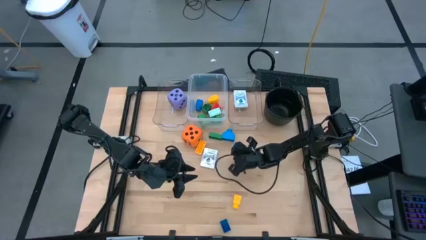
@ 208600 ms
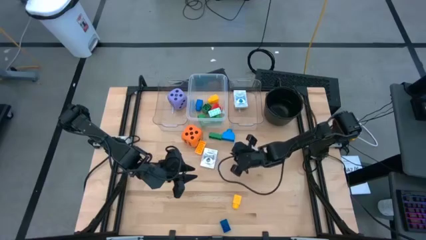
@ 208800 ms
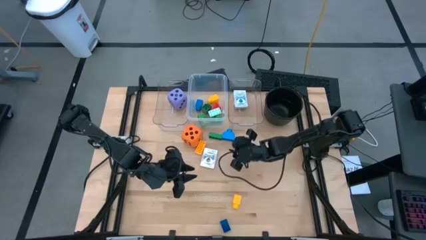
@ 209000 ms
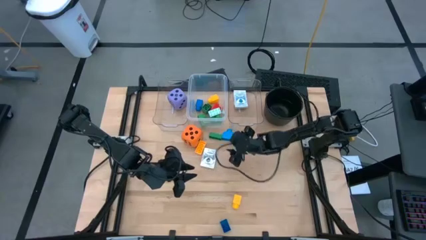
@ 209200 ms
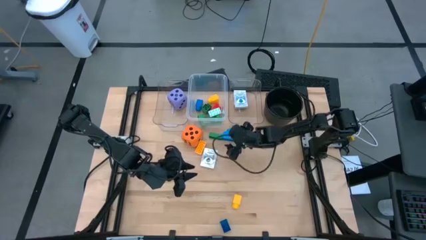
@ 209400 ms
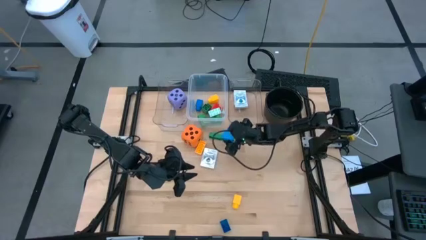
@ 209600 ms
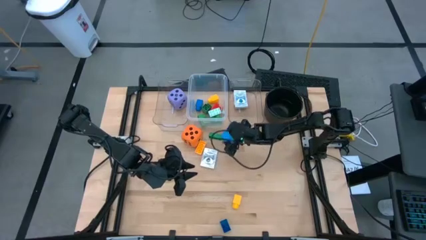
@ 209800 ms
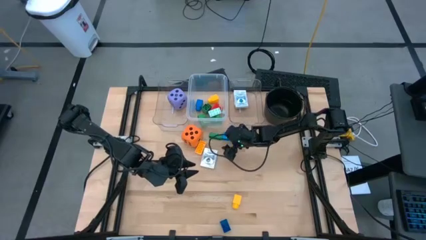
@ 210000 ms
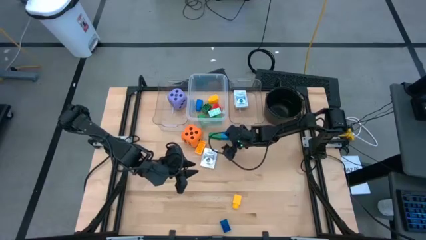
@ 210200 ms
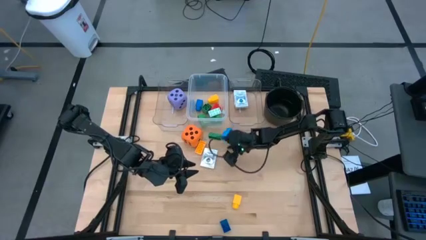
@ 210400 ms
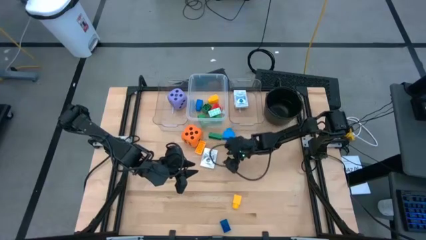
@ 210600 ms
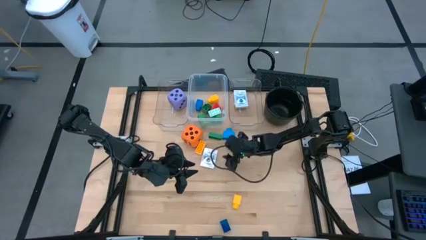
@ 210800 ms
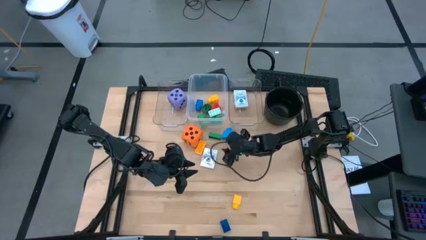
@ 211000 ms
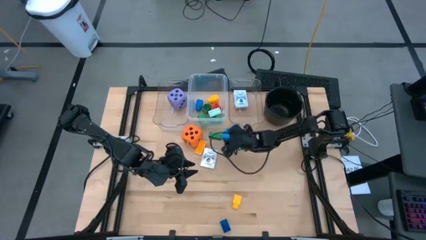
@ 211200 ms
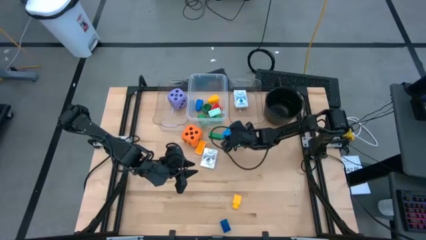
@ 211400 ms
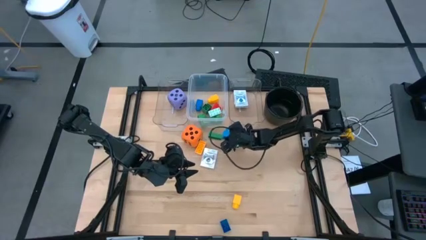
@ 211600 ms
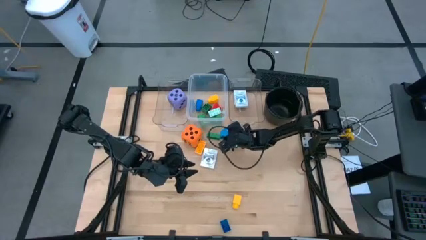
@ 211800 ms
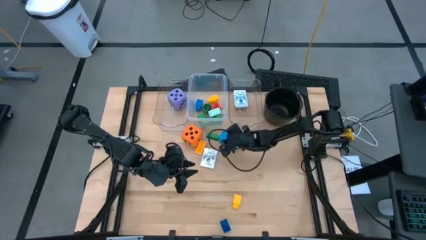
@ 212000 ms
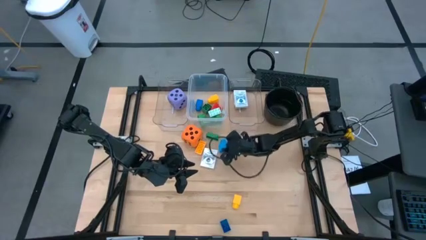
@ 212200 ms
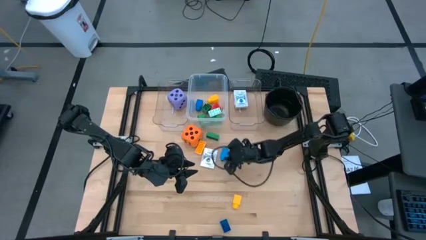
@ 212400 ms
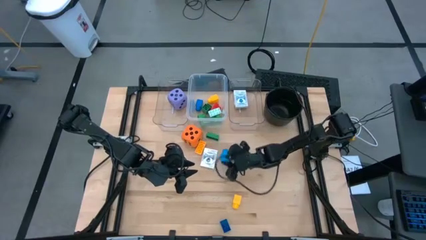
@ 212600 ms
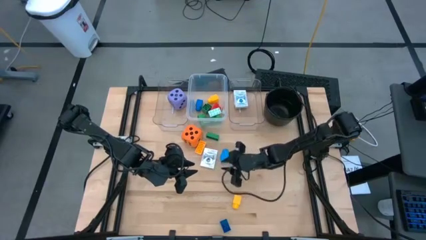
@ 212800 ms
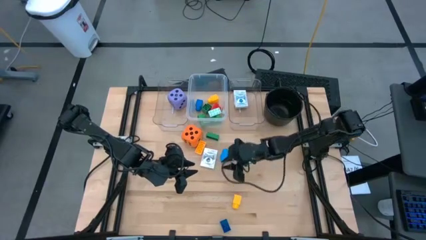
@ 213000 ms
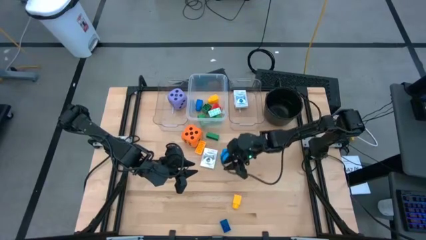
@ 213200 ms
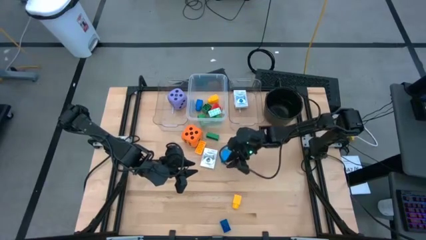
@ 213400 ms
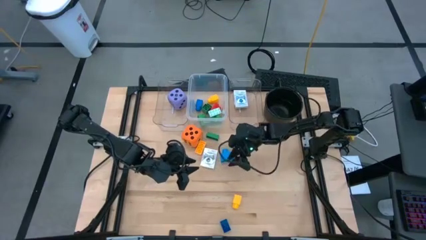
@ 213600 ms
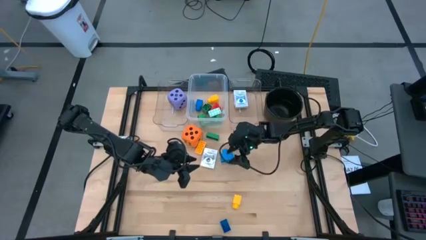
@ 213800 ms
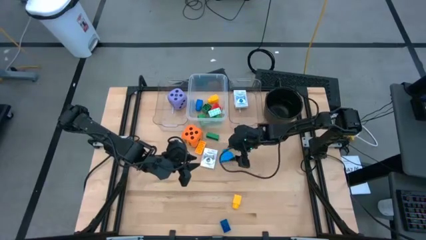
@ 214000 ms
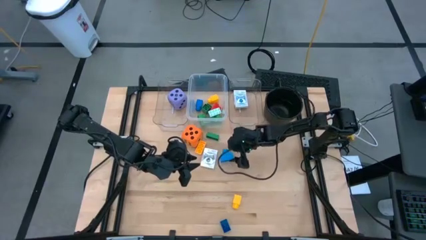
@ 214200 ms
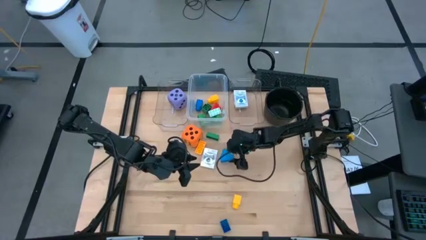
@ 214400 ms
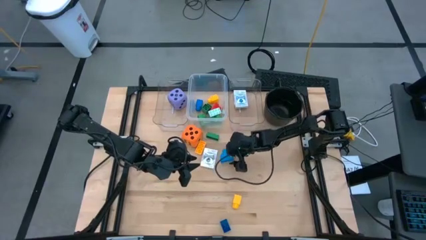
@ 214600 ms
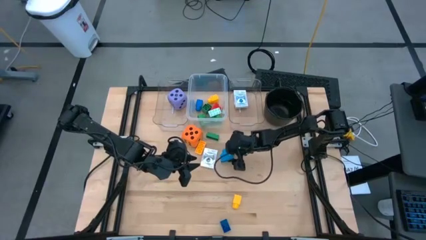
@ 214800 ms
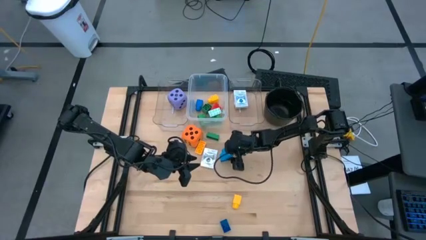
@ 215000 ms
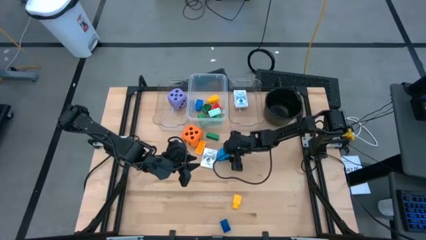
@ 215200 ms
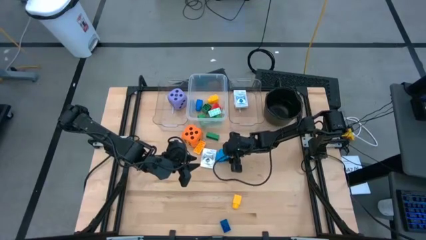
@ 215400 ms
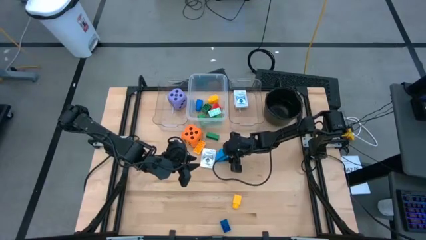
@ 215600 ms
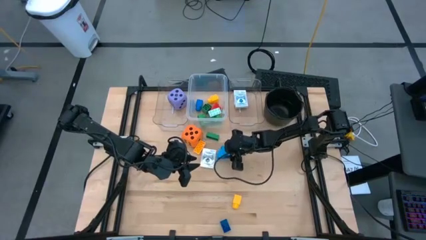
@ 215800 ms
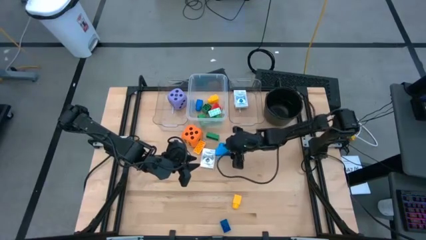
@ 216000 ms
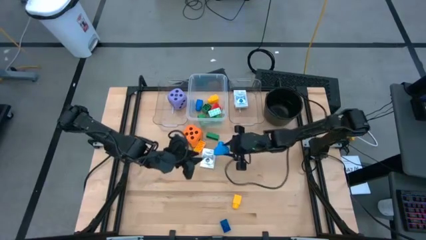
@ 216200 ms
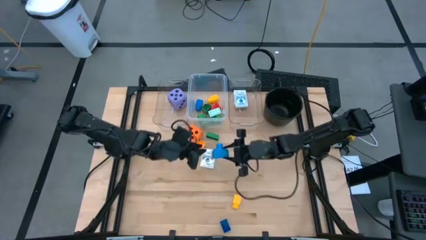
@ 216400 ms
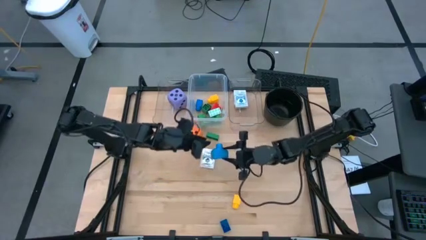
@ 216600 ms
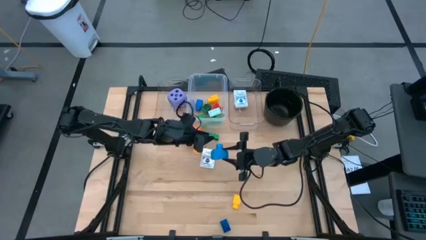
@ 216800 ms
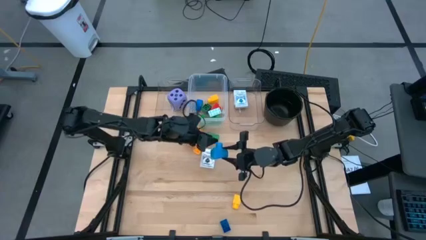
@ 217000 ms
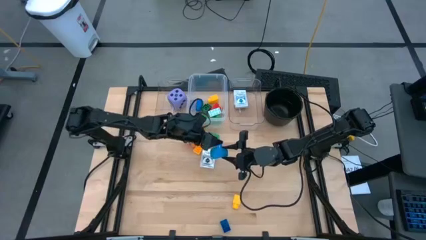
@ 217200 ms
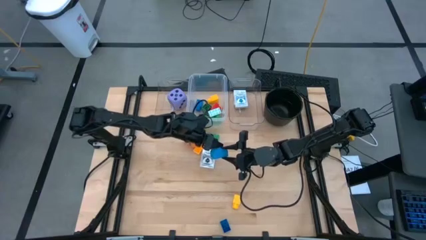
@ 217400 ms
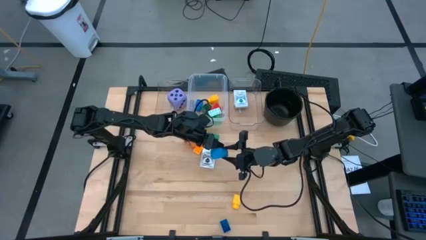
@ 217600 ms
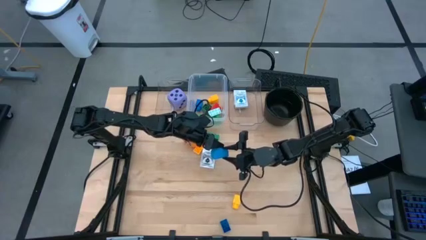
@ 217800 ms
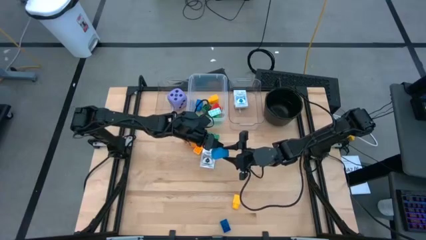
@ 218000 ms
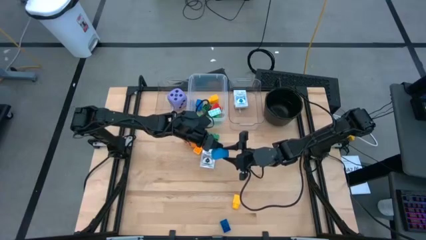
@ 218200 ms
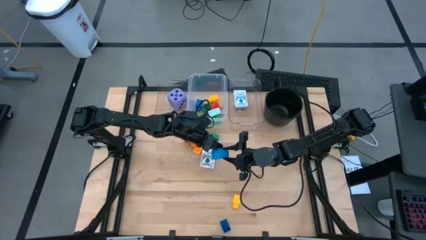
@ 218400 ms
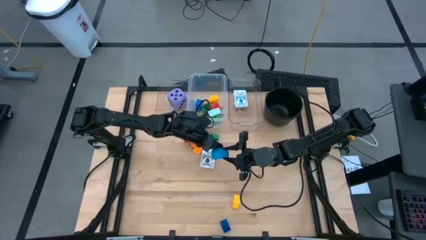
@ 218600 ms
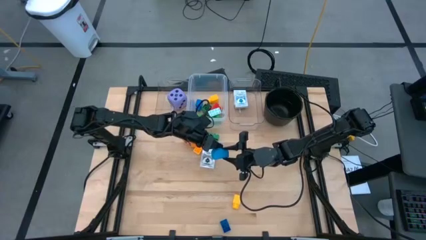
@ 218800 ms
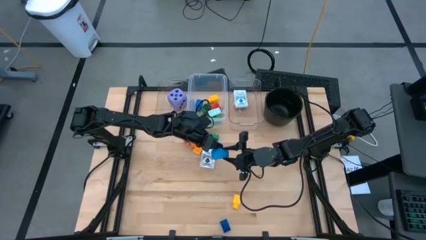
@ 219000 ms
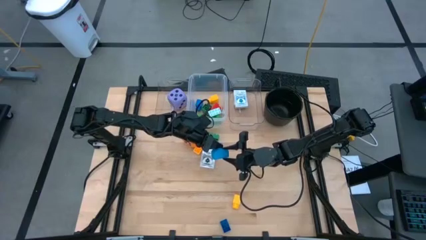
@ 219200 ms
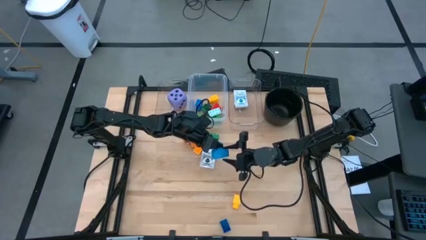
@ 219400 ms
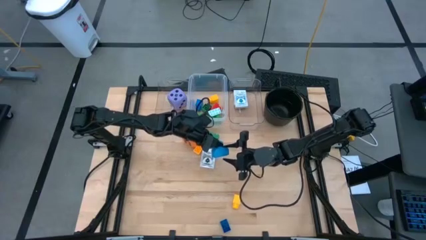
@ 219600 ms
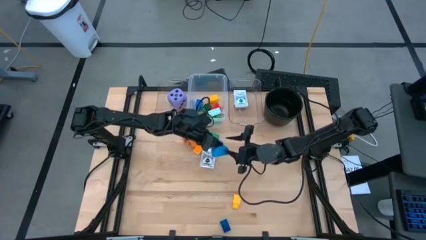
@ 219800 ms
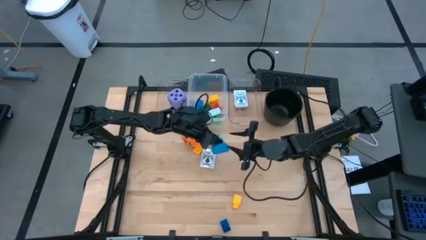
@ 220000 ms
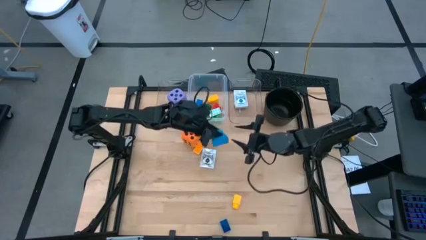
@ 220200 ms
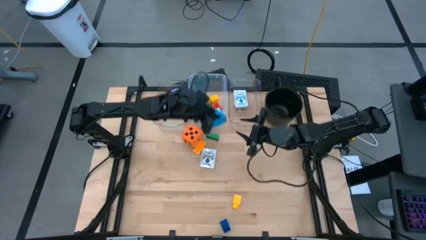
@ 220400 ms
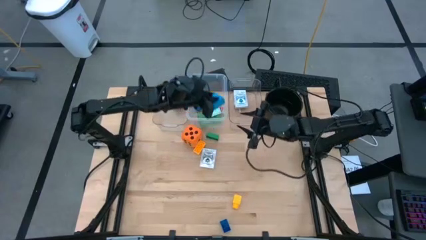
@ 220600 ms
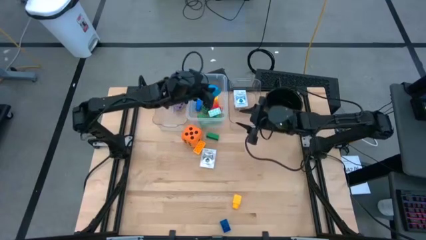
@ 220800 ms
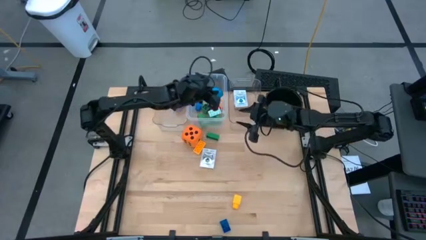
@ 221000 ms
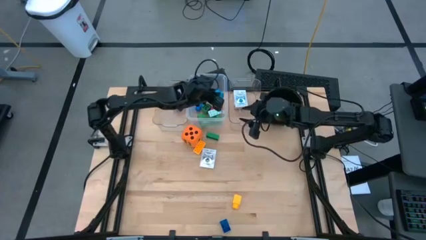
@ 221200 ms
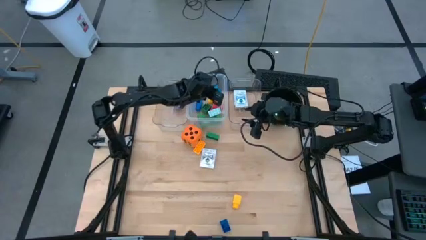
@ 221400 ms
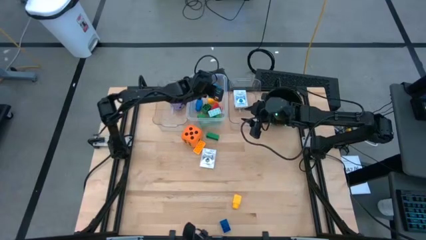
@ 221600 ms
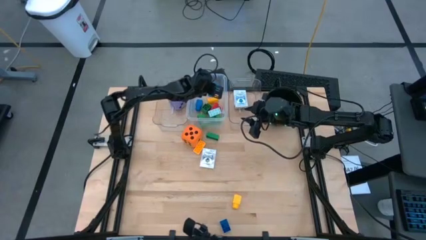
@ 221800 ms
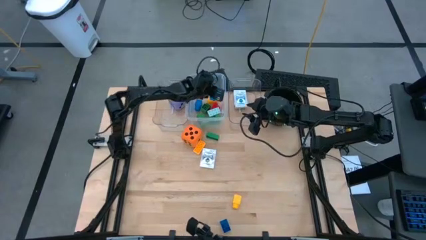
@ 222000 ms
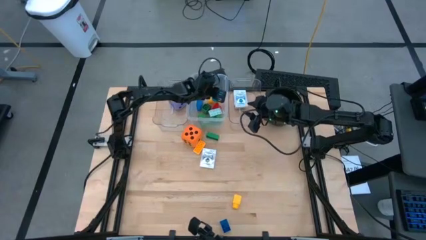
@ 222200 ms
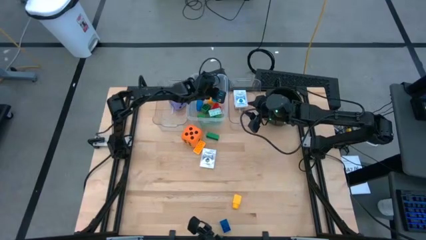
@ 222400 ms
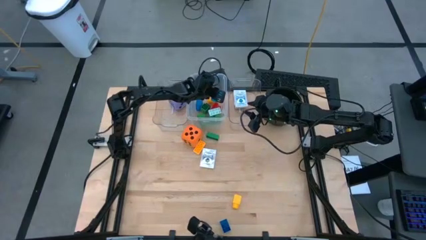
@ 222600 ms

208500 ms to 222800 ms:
Task: Pick & Place Toys
Put the light blue stud game piece into the middle transparent bin

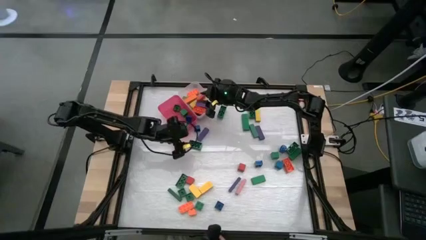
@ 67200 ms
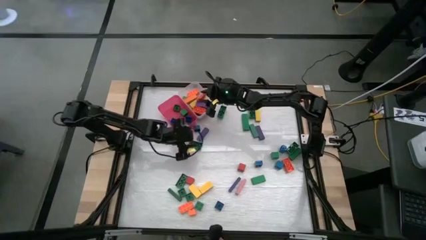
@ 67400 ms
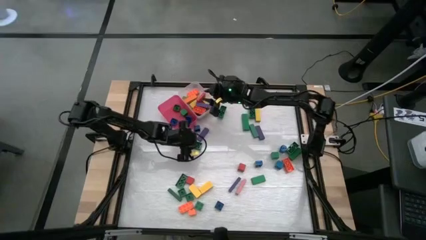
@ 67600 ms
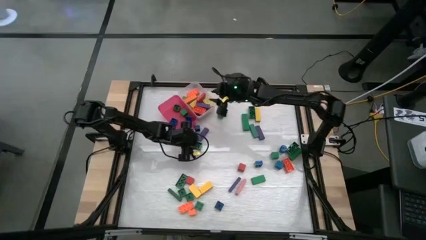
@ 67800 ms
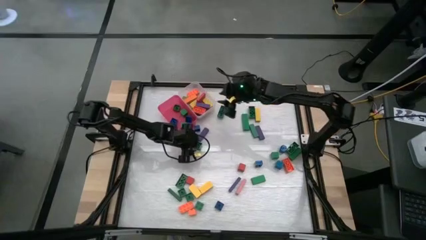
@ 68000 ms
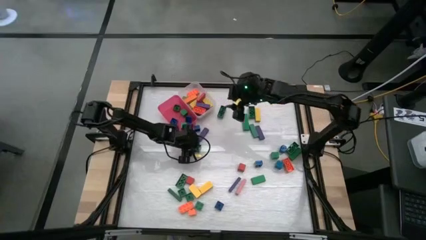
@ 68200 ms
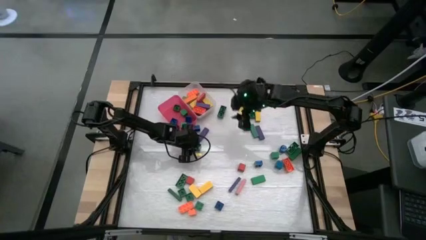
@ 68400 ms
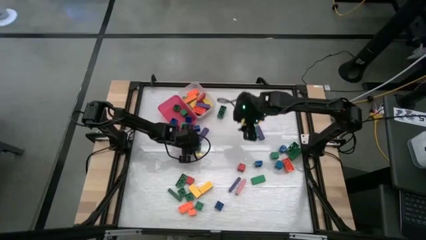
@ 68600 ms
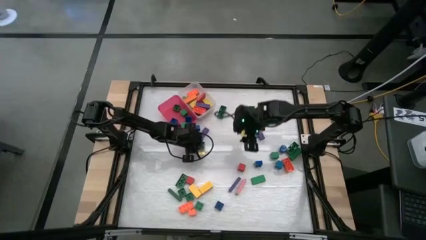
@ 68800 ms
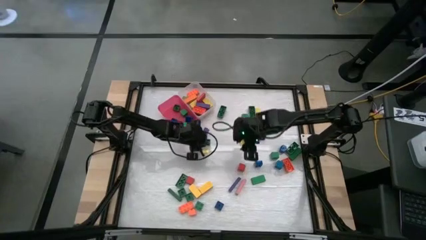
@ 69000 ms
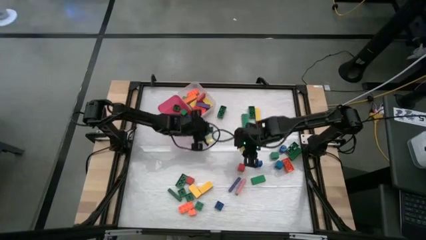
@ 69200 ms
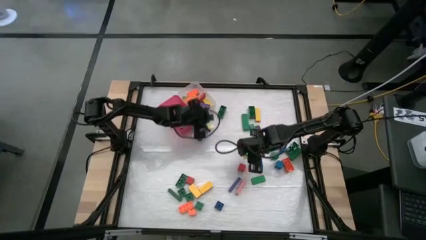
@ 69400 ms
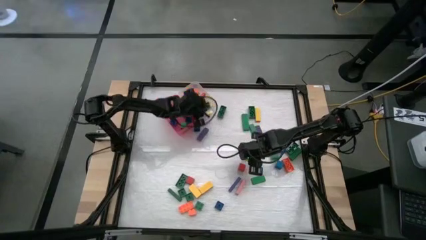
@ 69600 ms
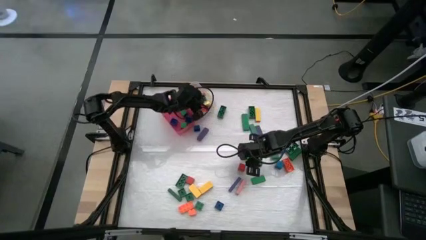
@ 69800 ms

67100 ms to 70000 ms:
Task: Sort blocks by size
Put the big green game piece into the white bin
